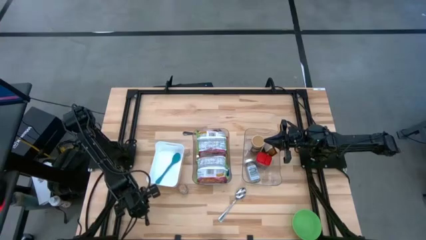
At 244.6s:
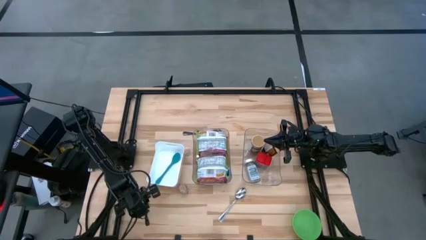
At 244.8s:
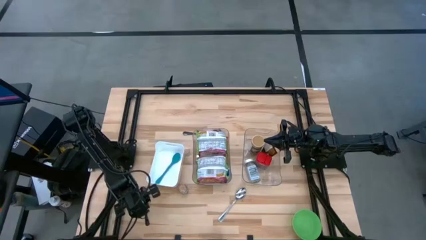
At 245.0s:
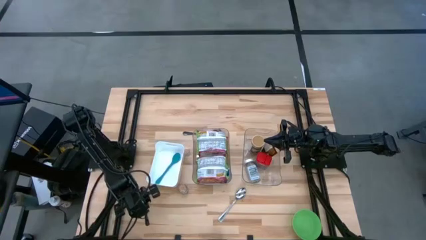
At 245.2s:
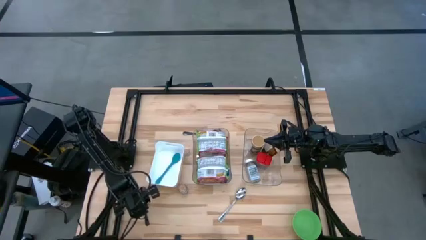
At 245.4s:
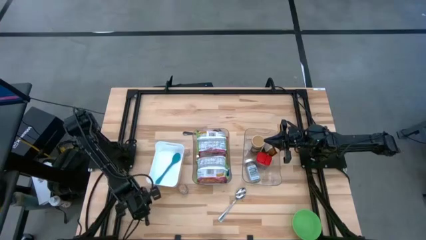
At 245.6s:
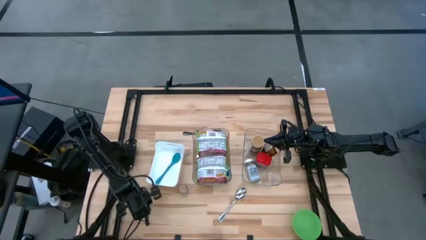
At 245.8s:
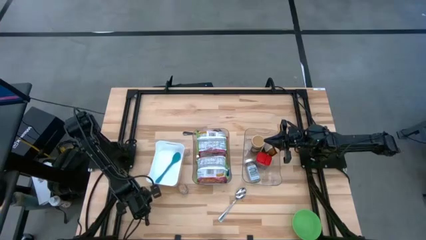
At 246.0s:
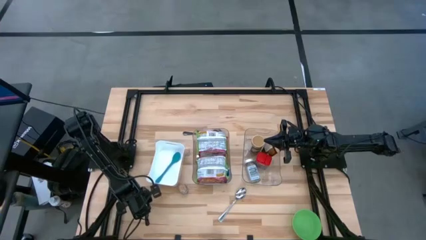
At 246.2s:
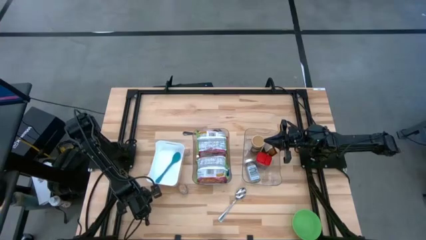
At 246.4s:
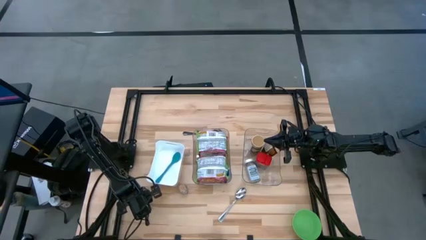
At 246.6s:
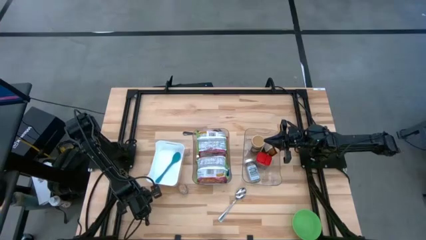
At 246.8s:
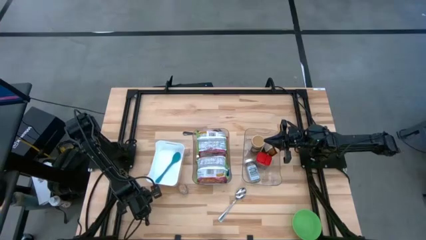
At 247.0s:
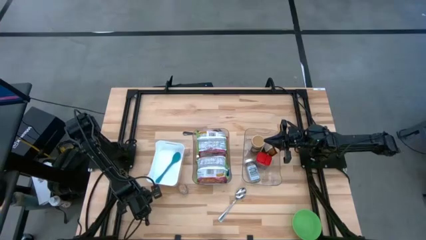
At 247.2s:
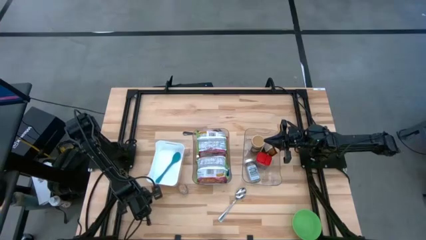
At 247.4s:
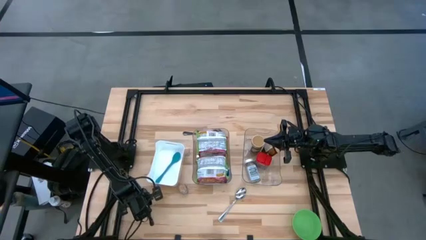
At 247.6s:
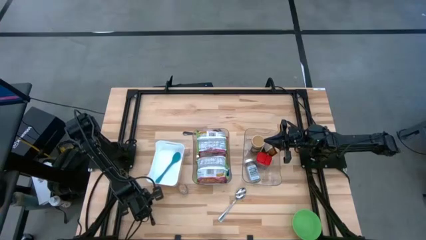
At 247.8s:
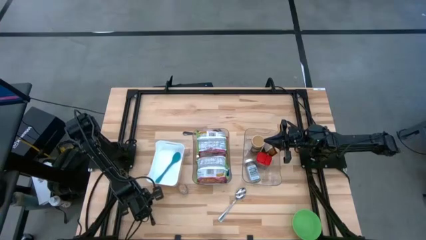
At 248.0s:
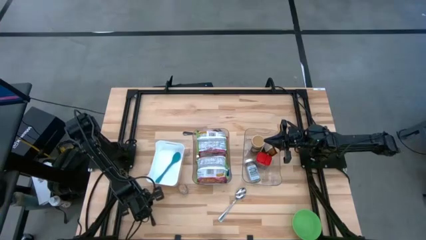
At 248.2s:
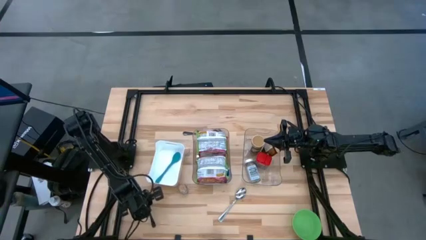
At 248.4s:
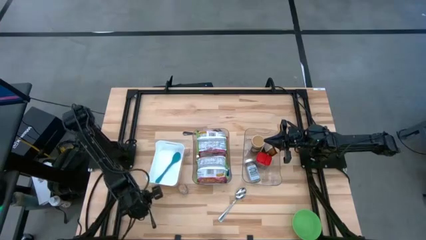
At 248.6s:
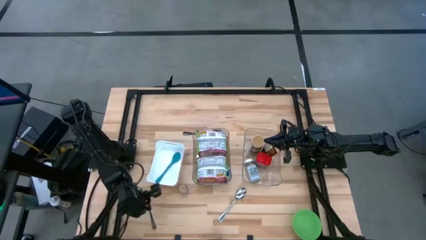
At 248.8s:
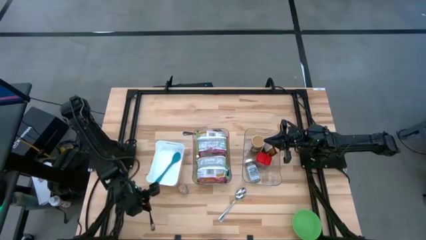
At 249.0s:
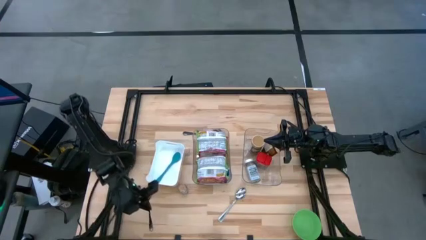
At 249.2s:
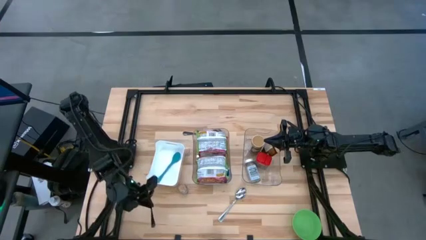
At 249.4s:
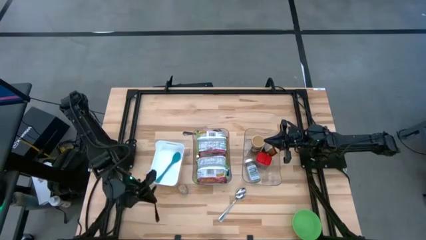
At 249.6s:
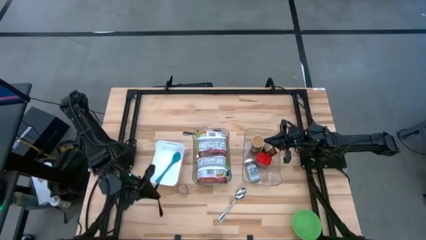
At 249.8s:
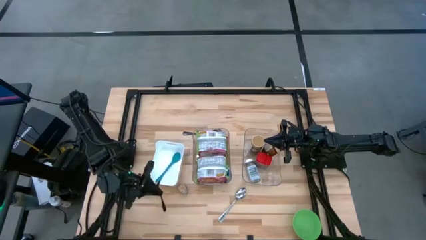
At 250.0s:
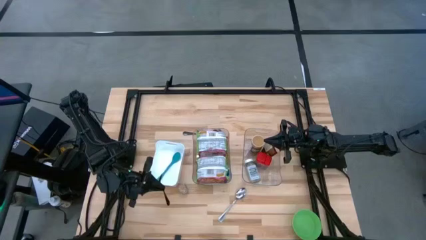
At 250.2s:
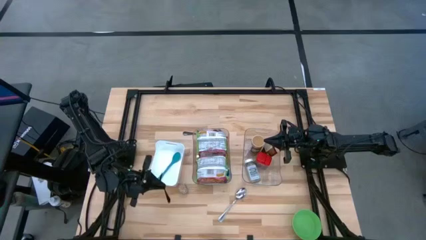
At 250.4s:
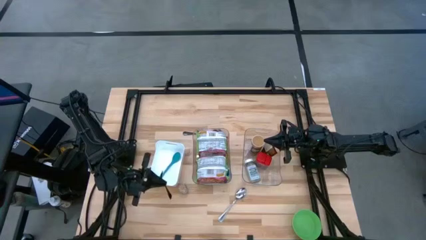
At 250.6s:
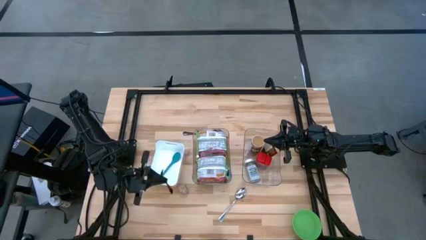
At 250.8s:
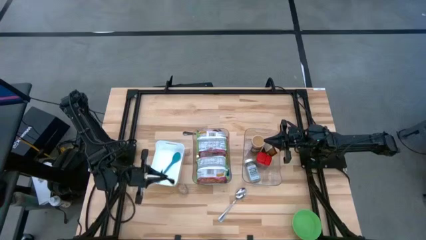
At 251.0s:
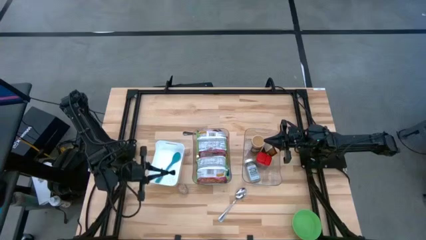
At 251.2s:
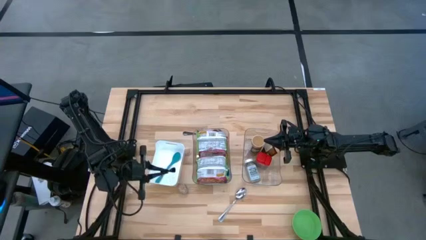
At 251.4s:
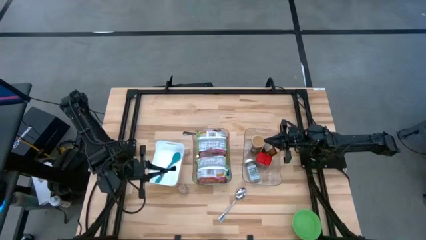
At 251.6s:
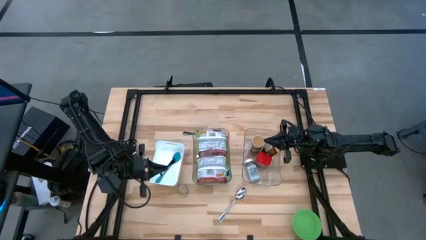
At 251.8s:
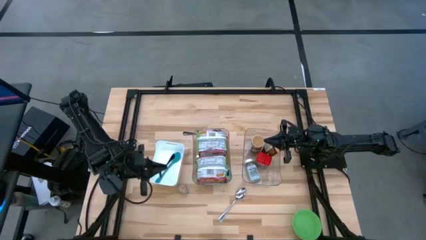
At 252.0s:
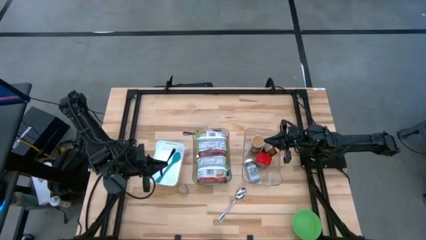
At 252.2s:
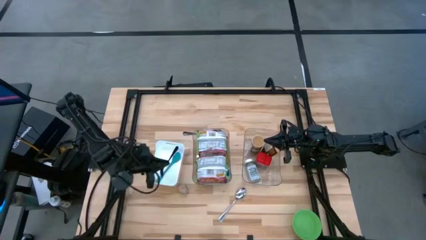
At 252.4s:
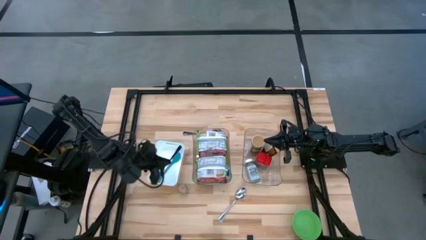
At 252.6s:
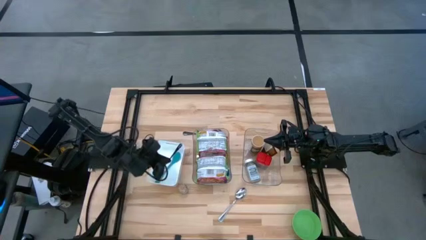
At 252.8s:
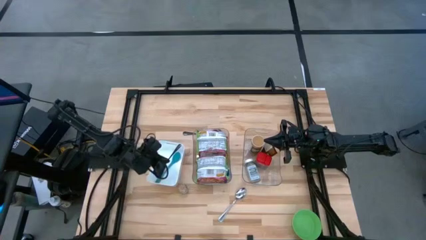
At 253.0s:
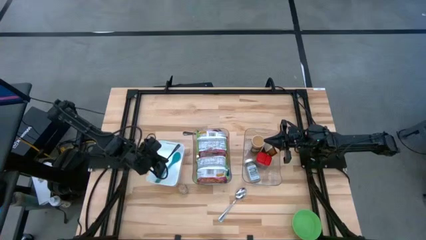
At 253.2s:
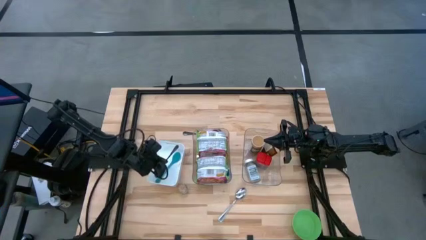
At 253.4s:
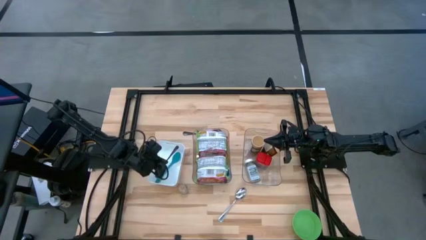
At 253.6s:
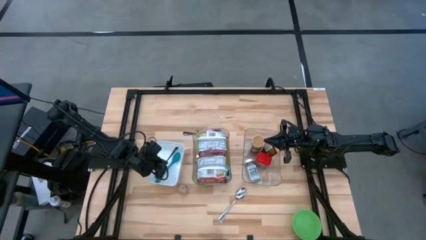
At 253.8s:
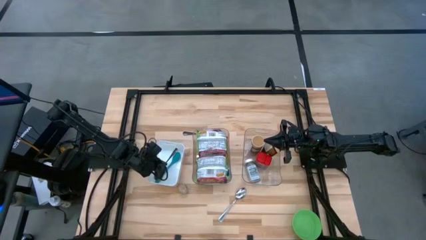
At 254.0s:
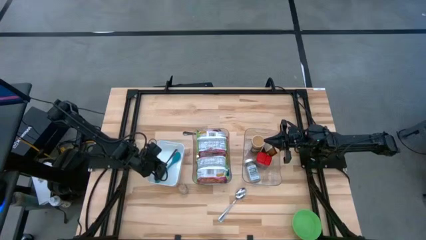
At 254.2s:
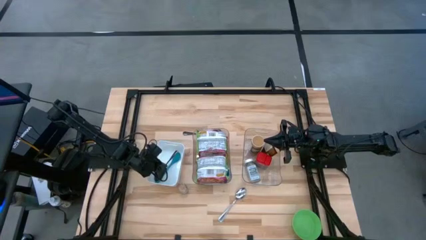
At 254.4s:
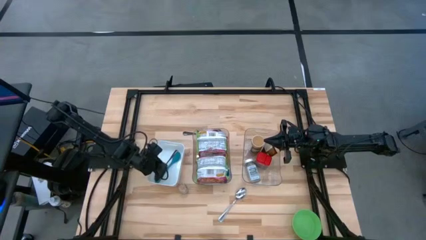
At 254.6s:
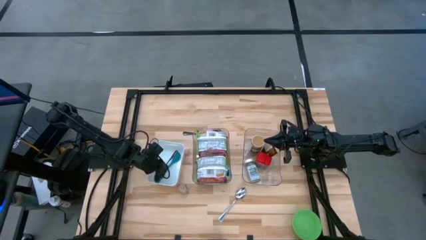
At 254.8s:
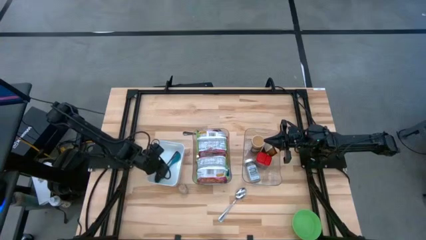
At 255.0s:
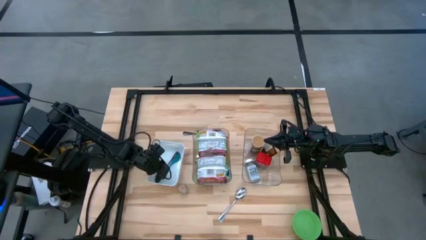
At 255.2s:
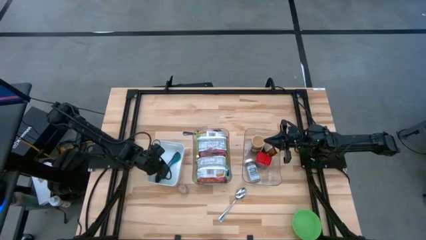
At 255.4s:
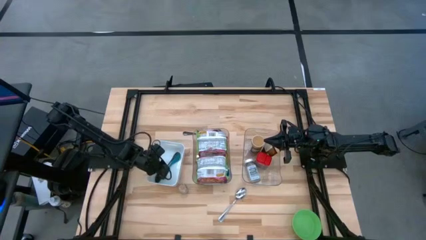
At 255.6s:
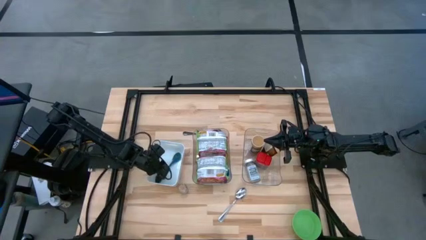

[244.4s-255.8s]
Task: Pick & Place Food Item
Put the bottom black spoon into the white bin

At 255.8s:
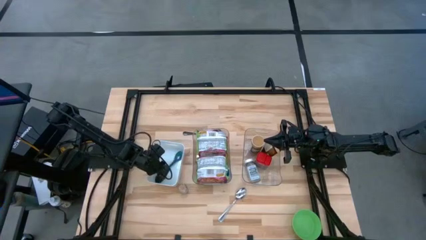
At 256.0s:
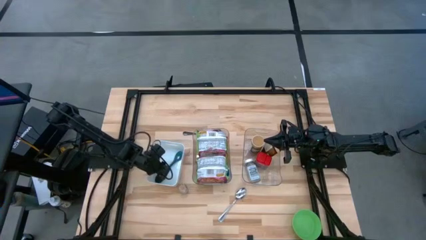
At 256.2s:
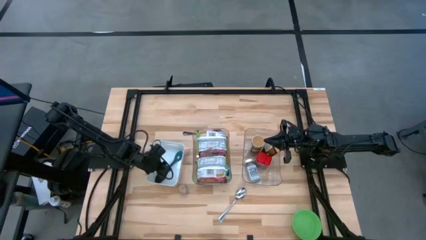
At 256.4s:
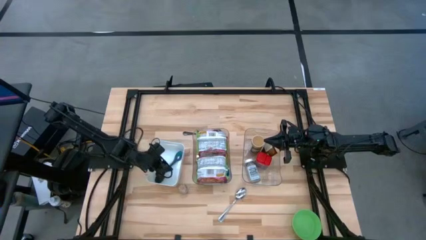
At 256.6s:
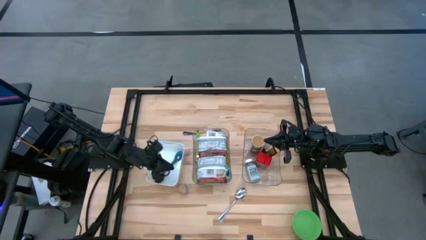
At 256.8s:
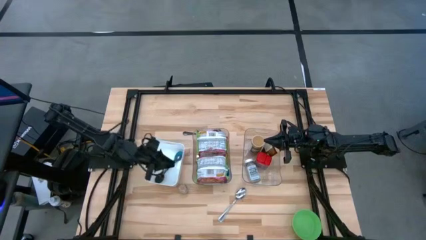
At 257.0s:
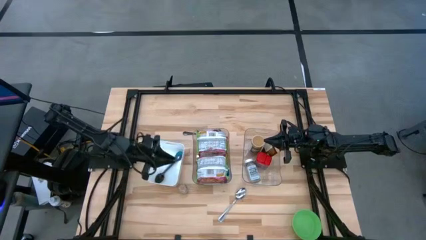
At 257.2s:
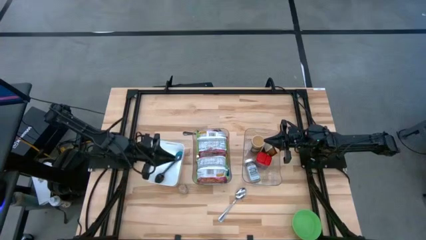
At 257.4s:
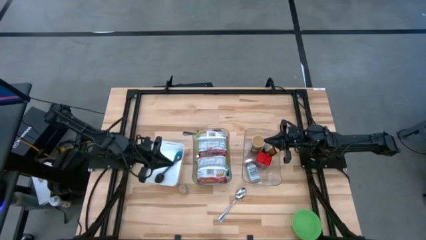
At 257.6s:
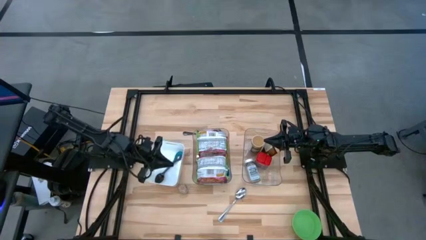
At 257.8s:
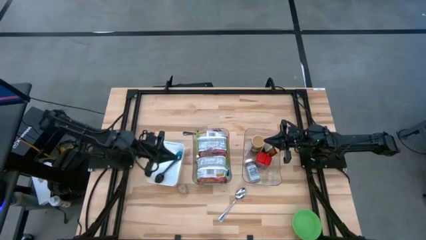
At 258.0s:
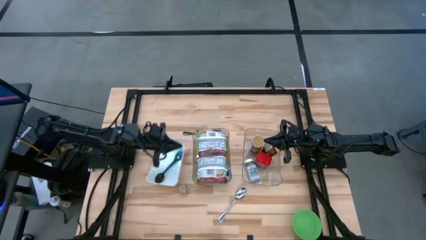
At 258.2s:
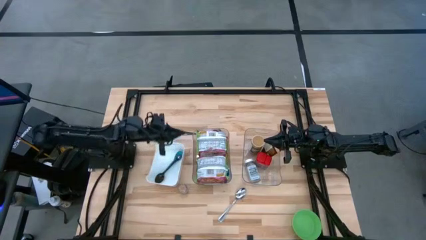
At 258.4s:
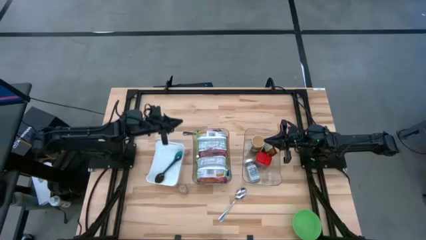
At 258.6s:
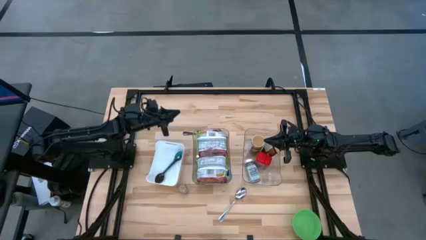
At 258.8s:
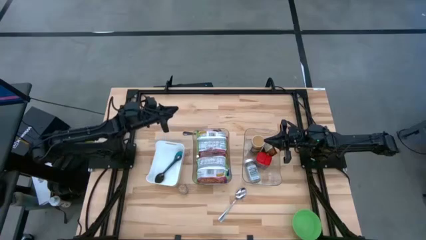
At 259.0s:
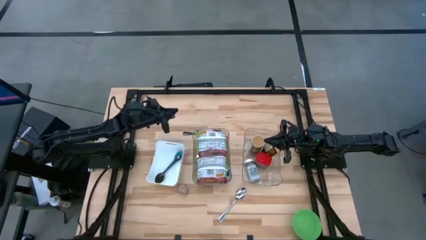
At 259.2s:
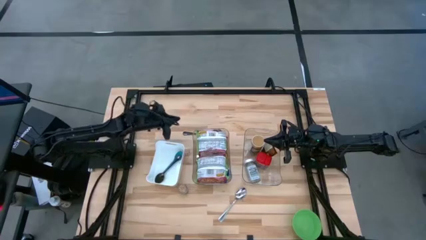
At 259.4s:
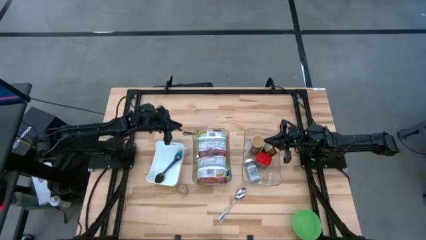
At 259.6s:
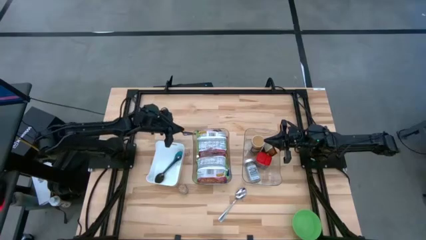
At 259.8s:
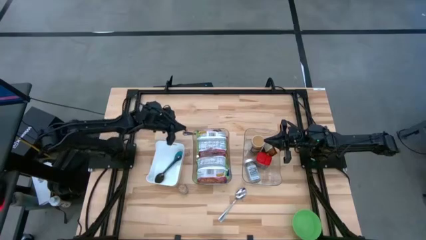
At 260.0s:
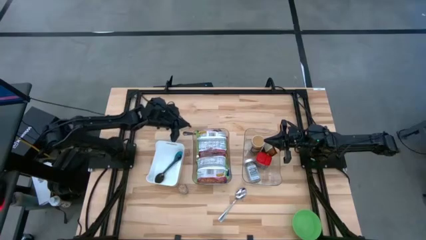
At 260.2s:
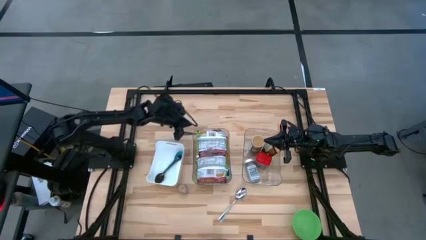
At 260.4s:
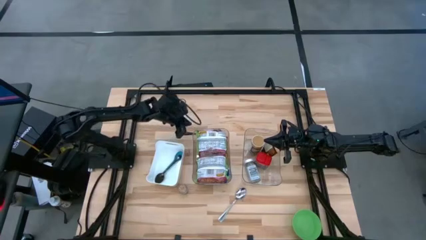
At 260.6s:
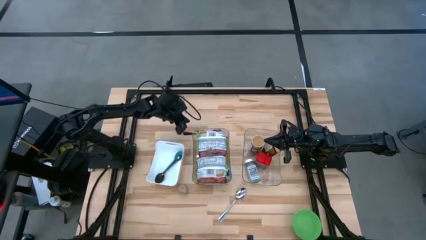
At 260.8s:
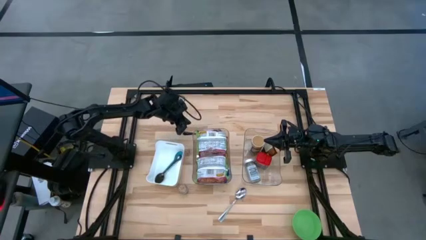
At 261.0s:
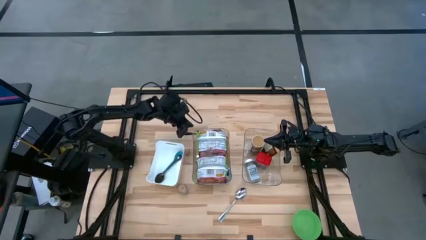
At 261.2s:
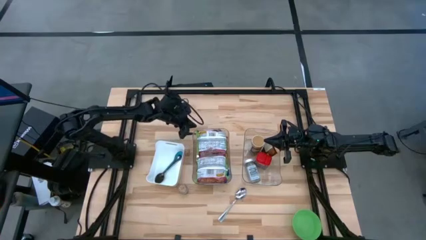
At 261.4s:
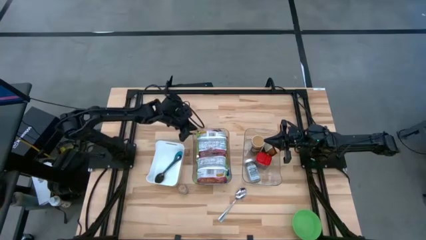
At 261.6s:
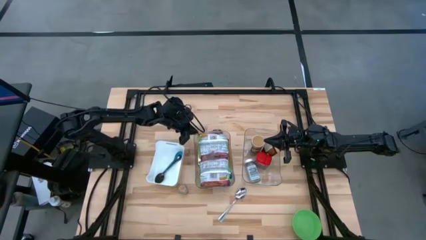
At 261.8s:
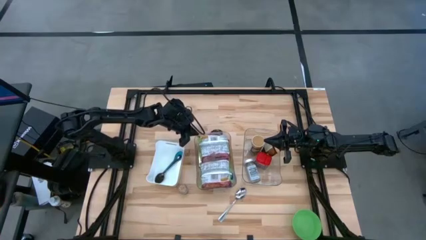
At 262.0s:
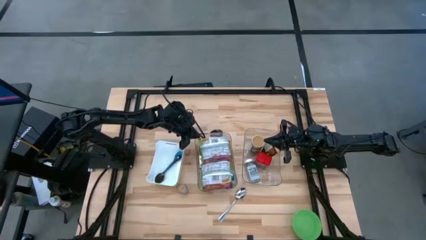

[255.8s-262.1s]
Adjust the left transparent bin on the table
